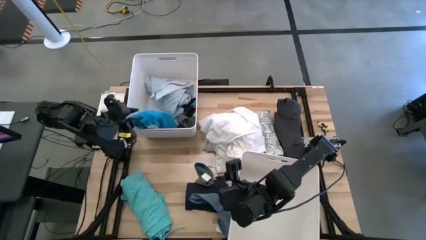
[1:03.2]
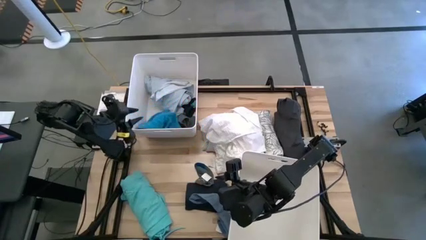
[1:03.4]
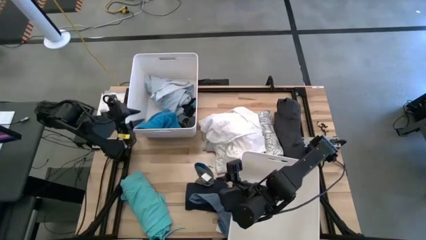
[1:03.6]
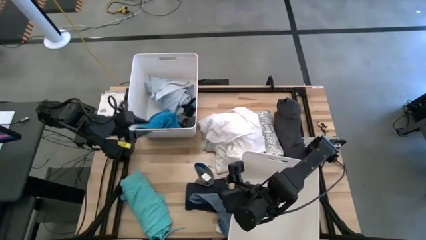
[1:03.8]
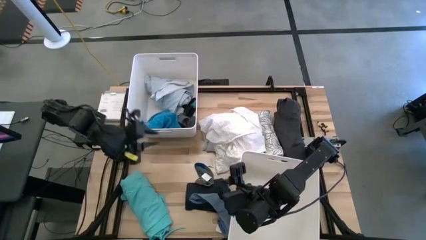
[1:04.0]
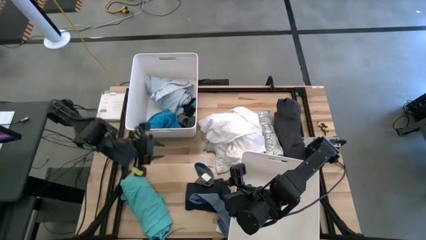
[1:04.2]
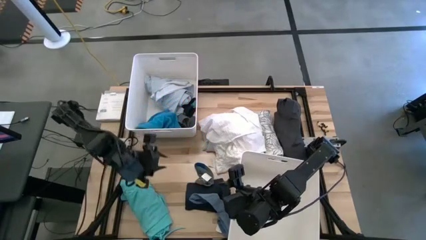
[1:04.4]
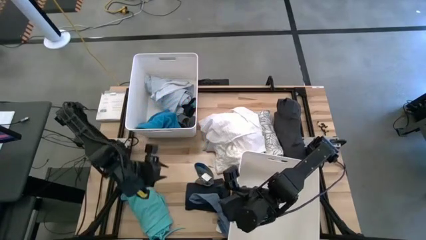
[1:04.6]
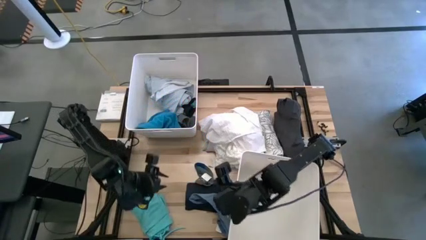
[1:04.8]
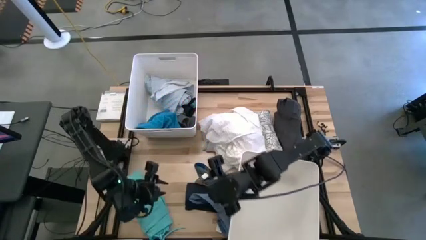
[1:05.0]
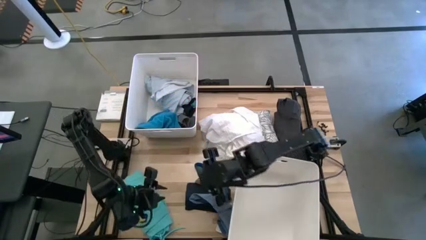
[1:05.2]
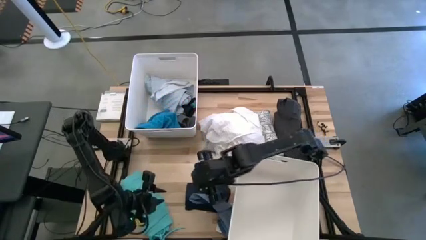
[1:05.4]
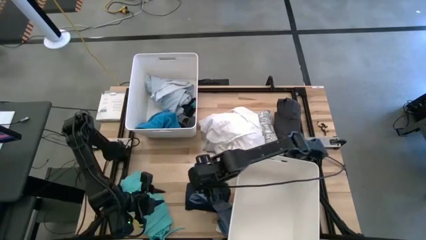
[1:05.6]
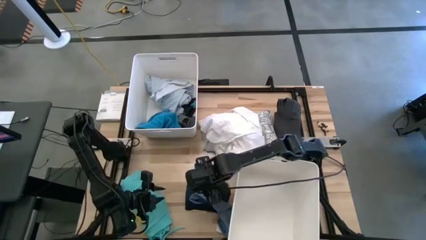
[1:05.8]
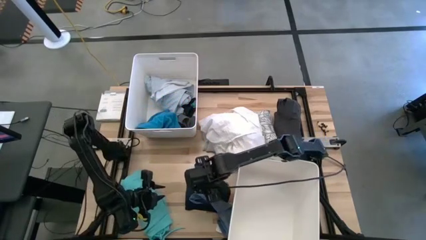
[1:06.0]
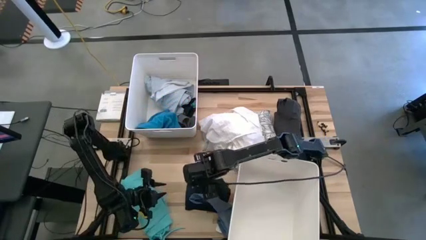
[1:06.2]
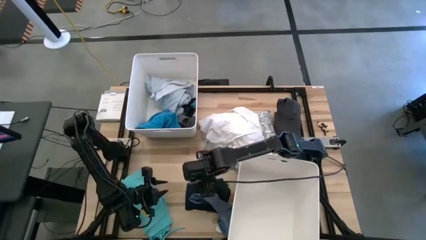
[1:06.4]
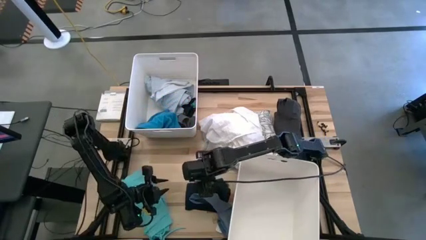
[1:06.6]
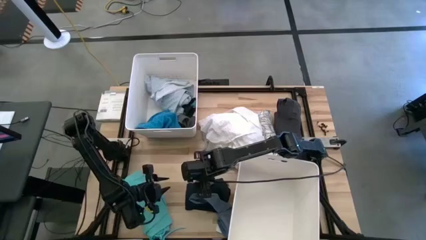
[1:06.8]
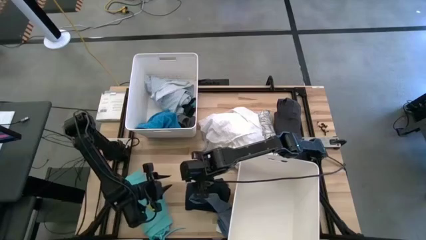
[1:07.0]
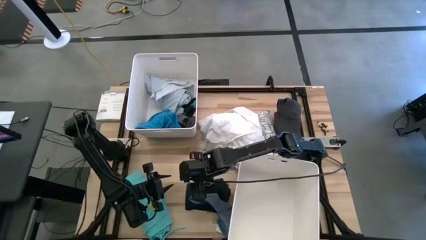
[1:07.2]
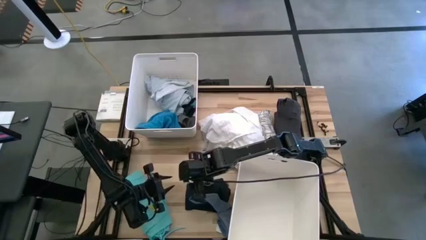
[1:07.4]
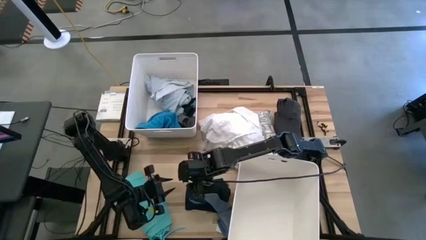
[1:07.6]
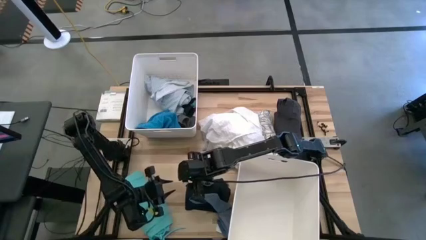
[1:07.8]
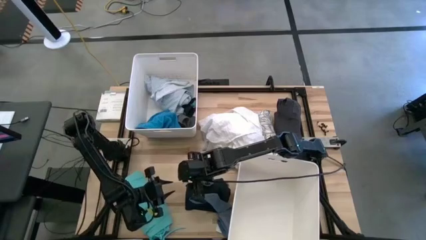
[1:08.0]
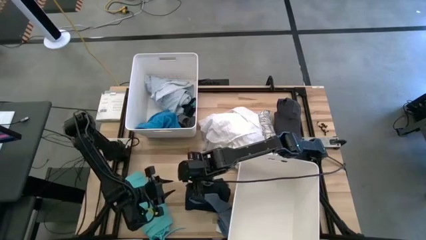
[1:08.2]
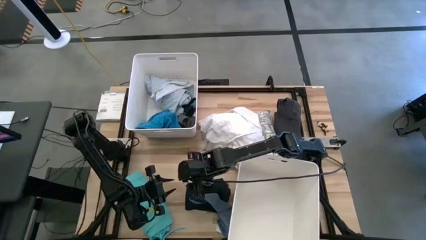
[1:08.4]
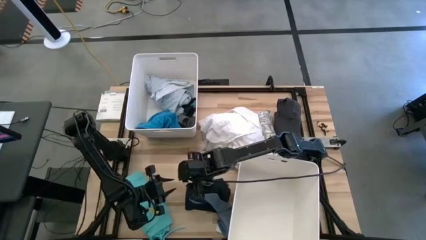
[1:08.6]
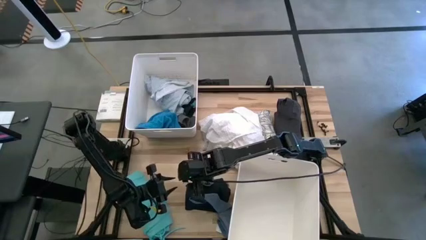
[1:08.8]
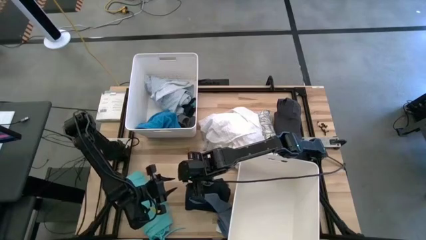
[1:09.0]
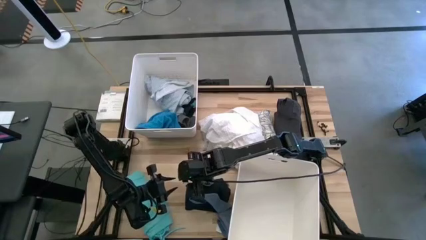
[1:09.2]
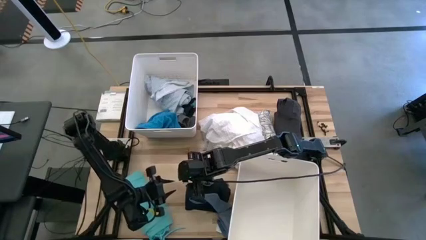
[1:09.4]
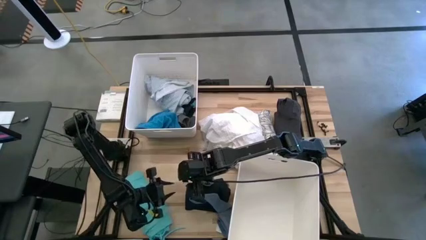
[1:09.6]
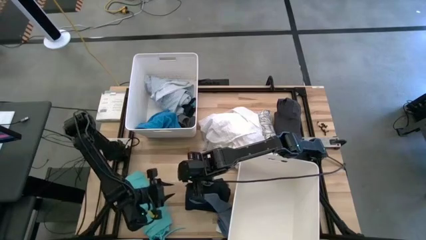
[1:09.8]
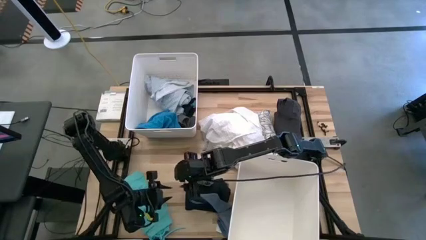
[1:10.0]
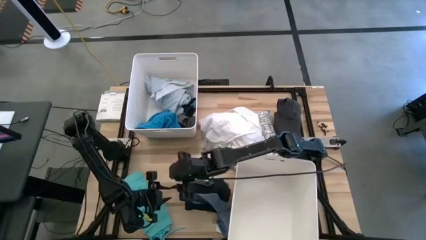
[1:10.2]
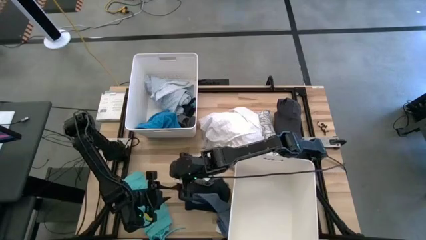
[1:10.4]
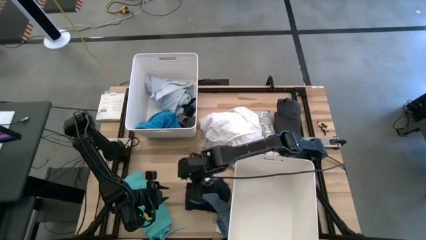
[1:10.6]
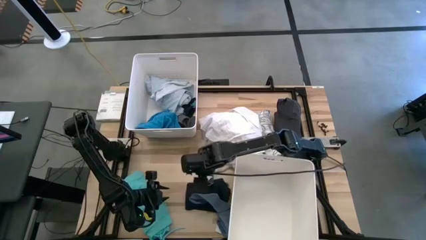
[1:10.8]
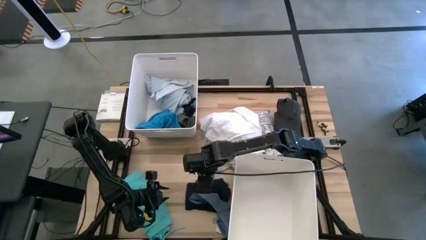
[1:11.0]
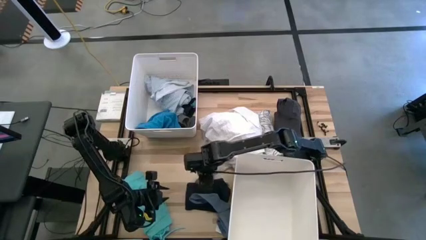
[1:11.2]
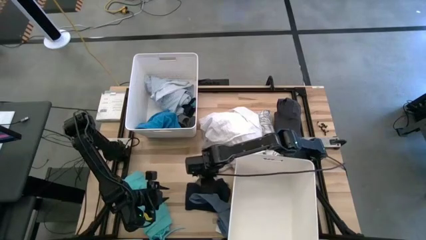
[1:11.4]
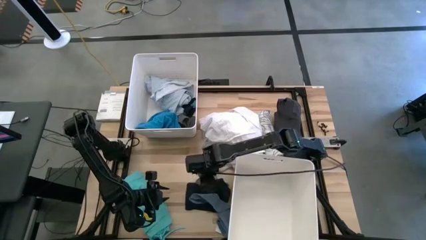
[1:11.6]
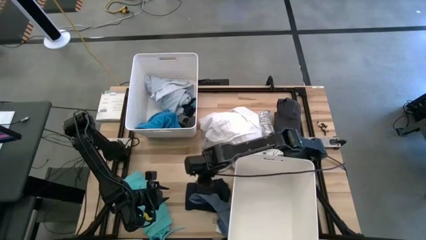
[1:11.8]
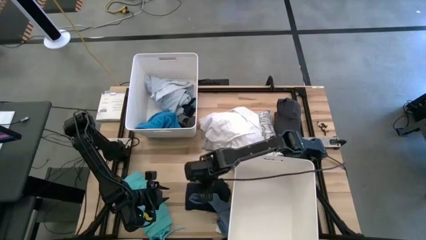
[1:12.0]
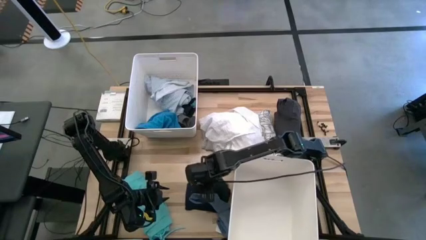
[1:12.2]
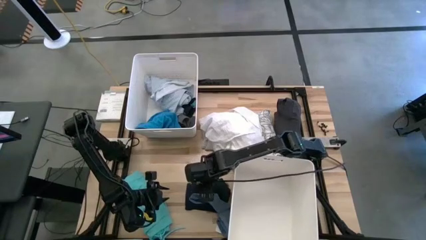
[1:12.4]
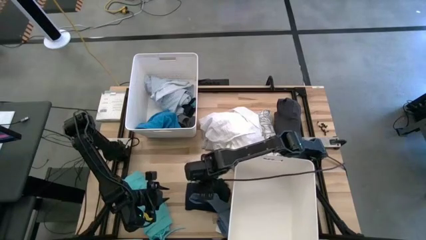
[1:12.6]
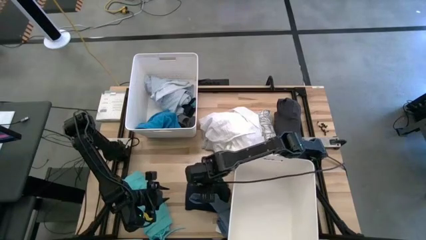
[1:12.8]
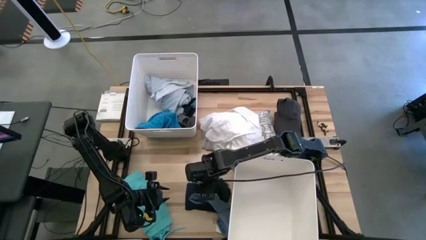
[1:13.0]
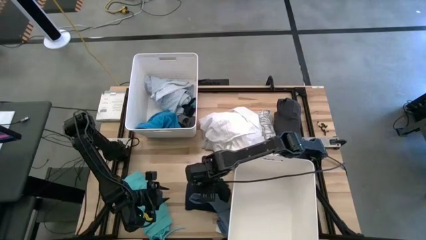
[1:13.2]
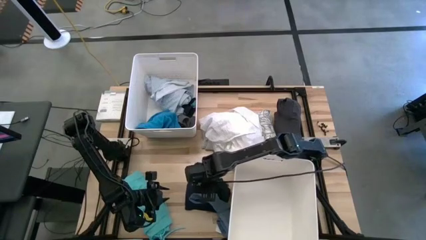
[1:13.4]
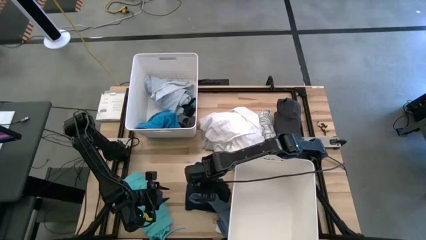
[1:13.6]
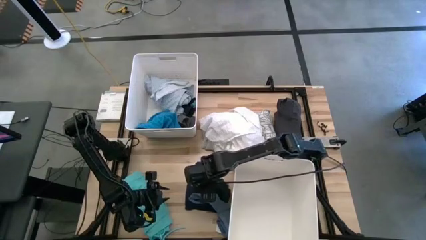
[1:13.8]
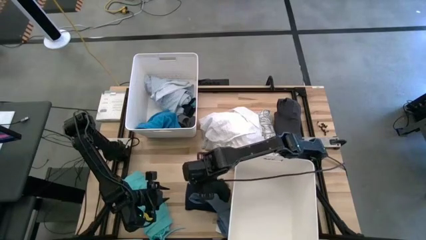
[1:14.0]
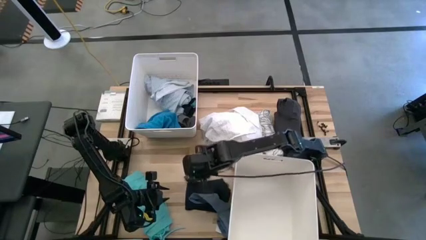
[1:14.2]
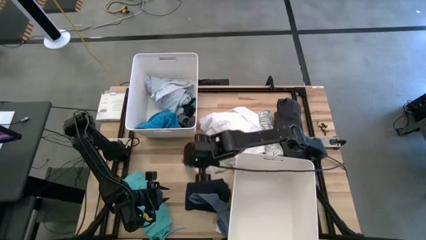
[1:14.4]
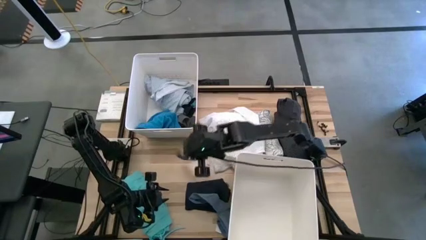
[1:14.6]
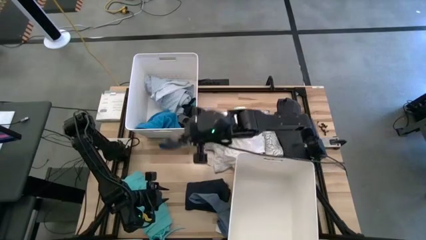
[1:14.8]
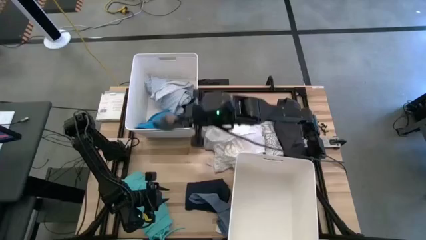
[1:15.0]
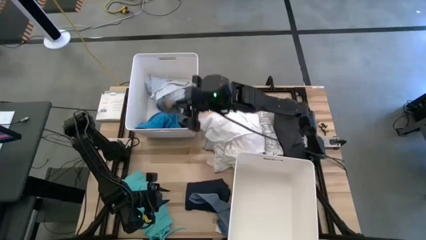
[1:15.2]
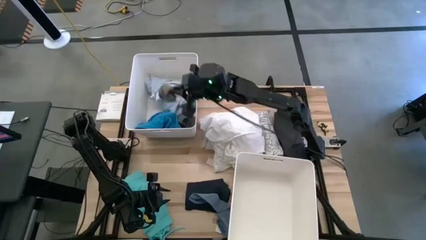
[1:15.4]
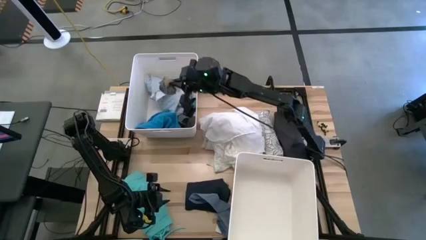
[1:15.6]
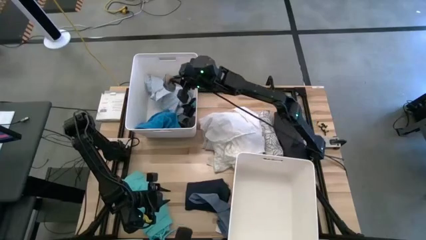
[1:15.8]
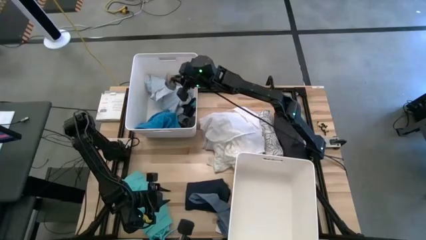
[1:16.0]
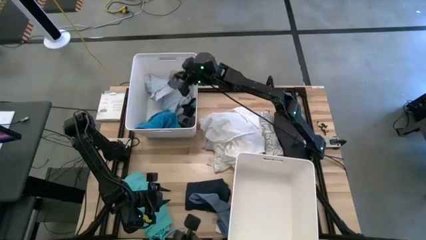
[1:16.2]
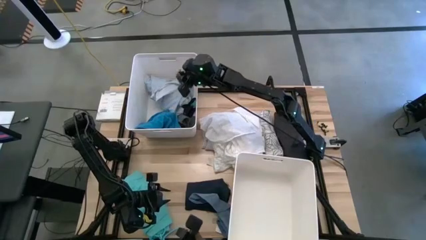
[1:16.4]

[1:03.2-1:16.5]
Task: Sort clothes
Put the blue sock into the top white laundry bin

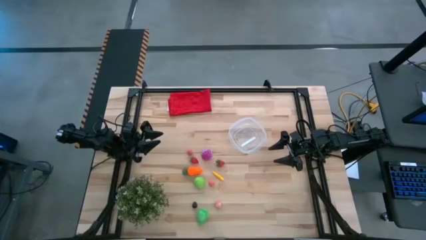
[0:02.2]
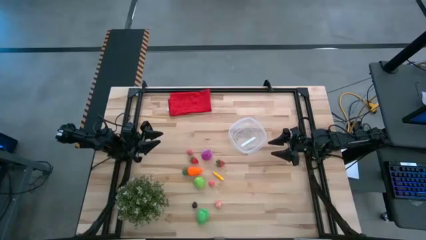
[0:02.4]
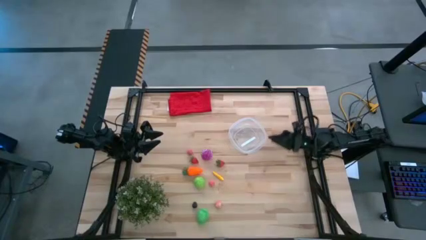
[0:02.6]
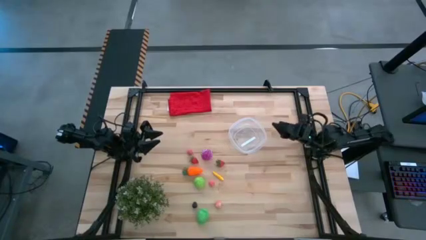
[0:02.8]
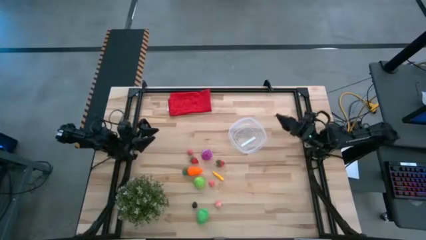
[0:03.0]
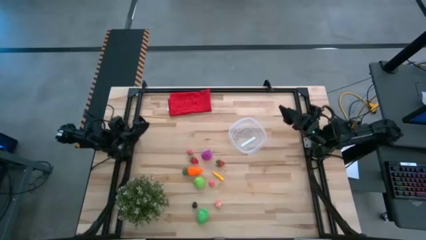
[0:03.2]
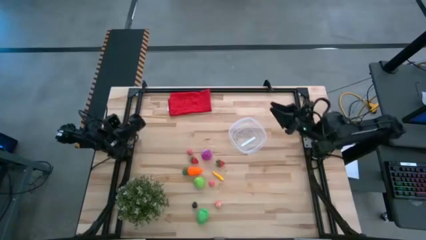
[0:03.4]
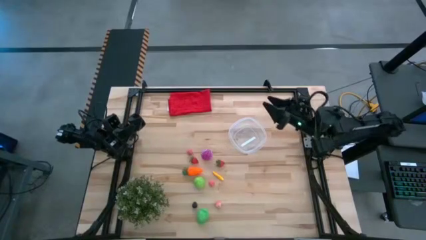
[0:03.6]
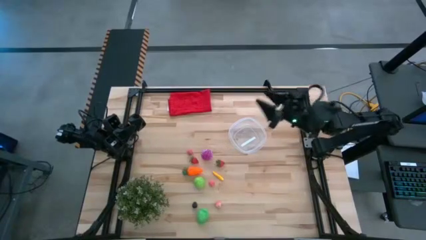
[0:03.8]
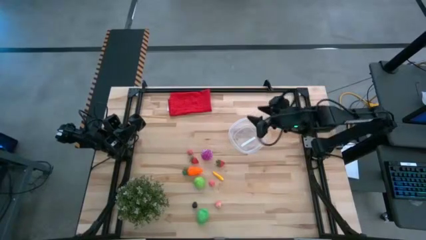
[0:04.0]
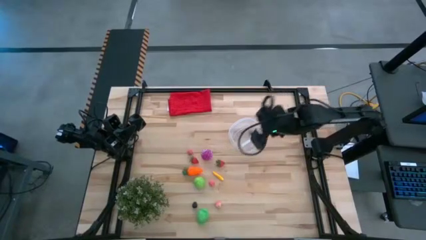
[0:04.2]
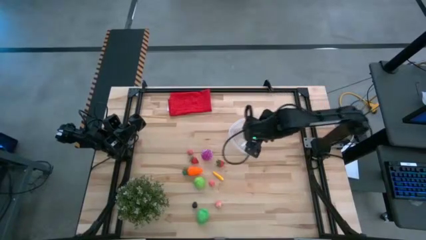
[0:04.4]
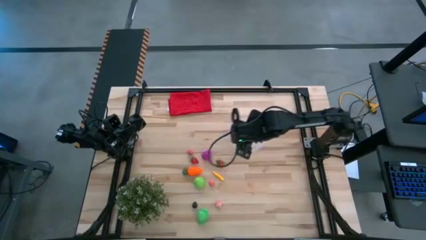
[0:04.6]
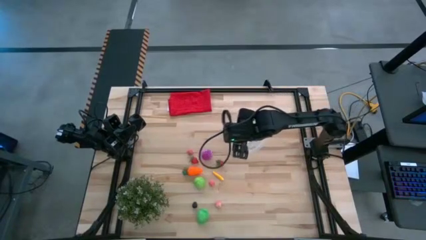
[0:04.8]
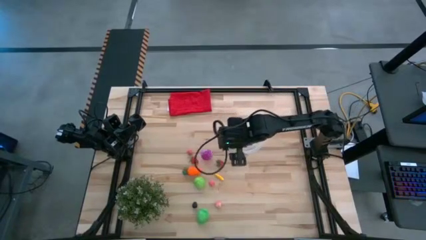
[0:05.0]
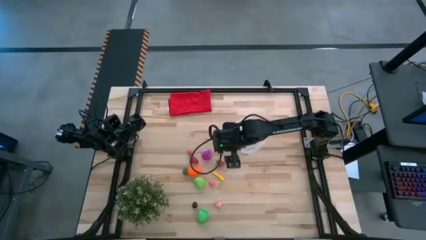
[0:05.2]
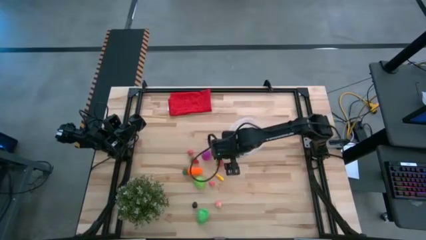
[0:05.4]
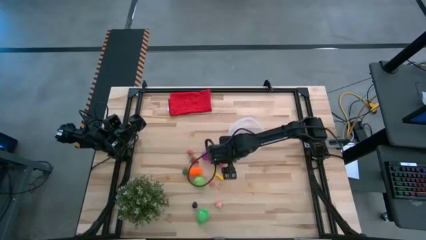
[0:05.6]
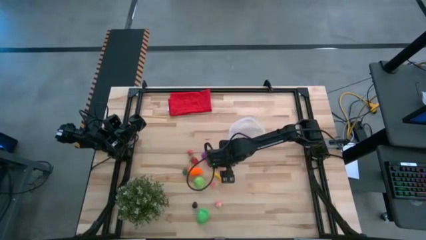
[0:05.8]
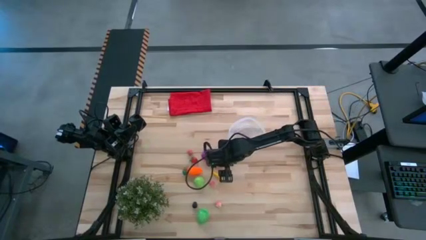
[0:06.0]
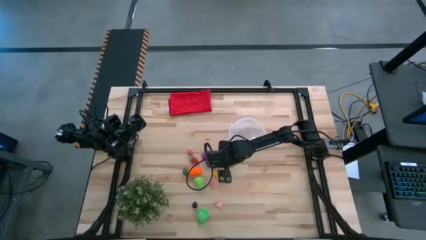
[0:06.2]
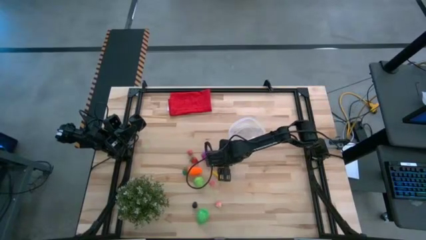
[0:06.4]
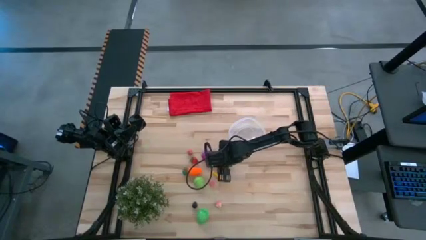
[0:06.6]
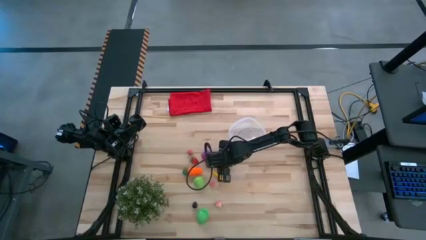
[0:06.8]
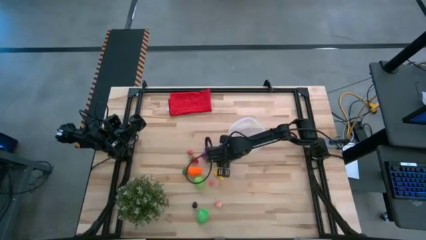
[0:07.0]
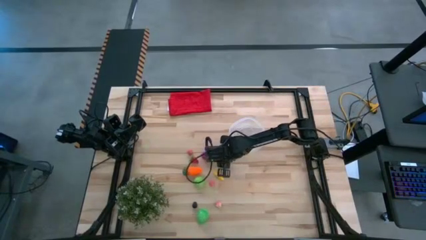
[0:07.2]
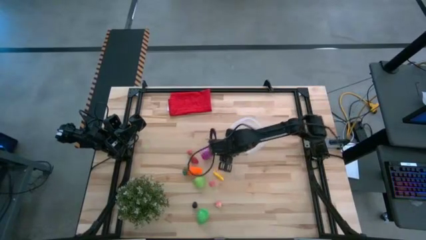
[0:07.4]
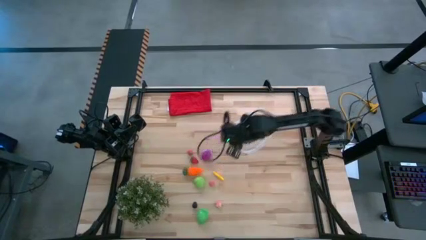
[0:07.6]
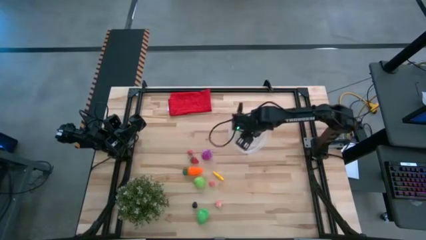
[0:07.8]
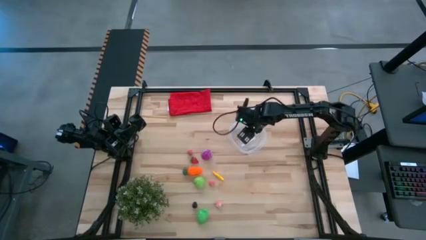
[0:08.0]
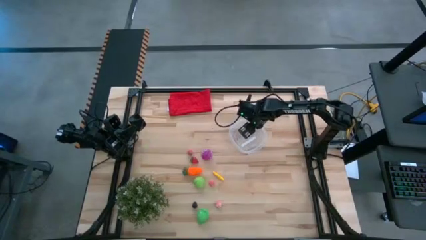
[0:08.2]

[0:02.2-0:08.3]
Task: Pick and placing Produce into tupperware
Put the right red strawberry into the transparent container
